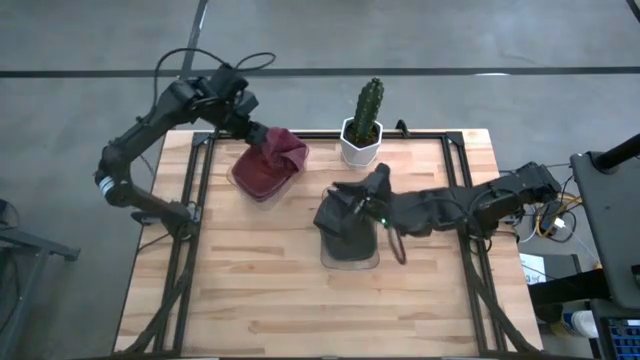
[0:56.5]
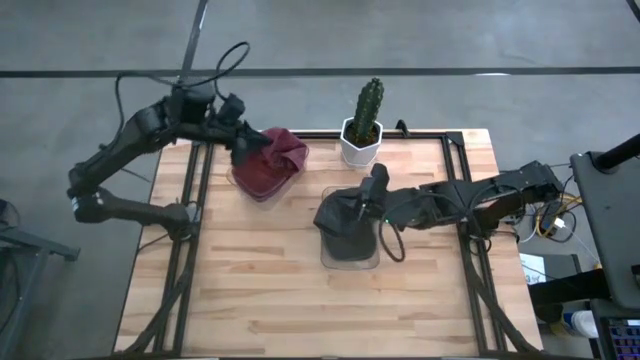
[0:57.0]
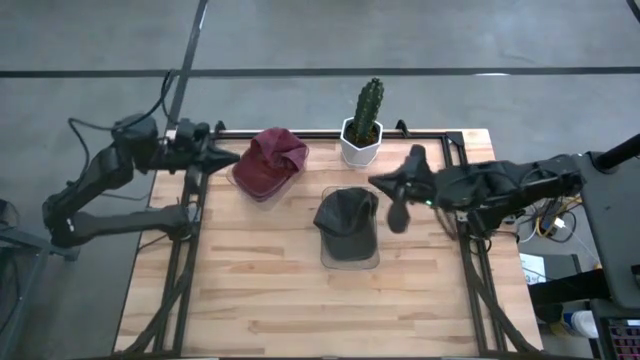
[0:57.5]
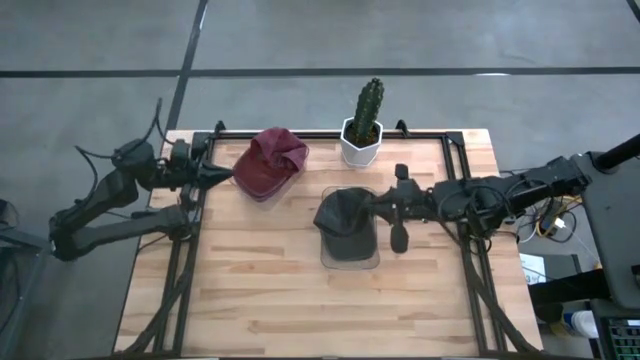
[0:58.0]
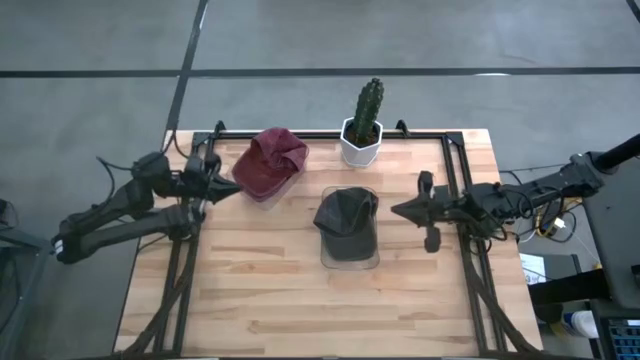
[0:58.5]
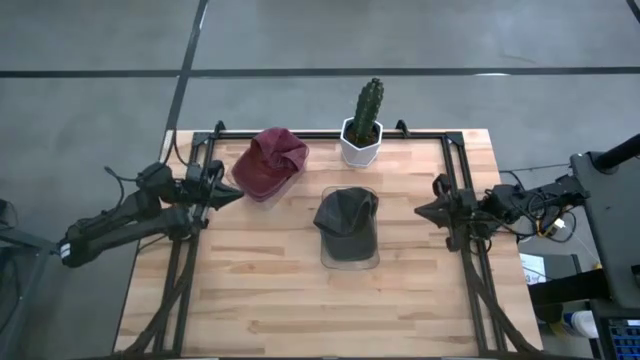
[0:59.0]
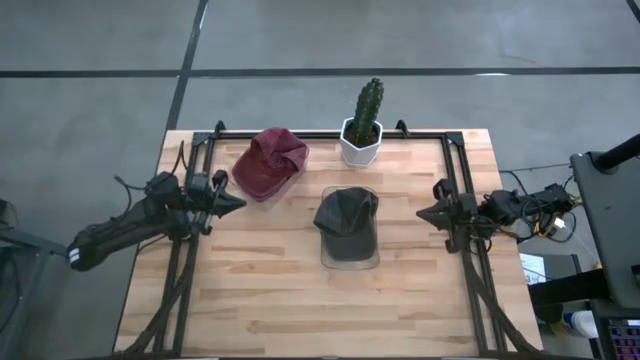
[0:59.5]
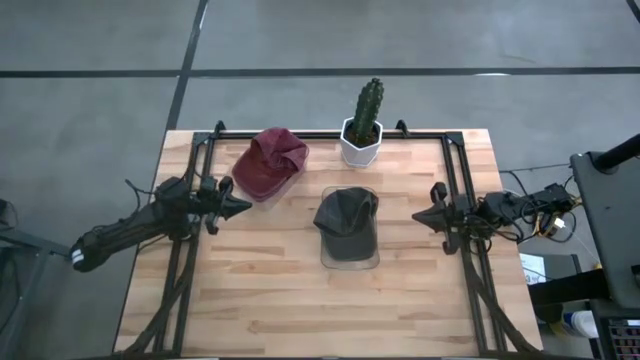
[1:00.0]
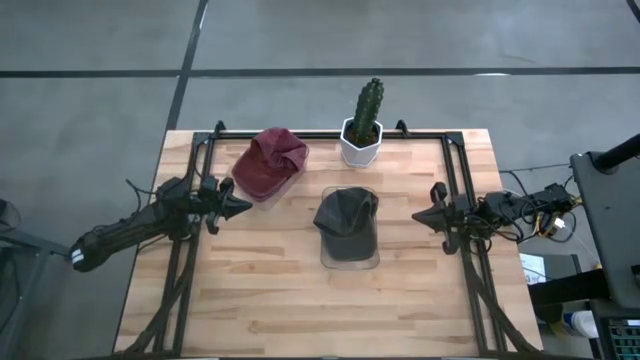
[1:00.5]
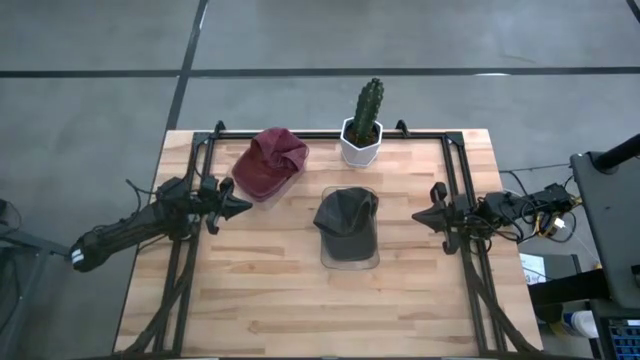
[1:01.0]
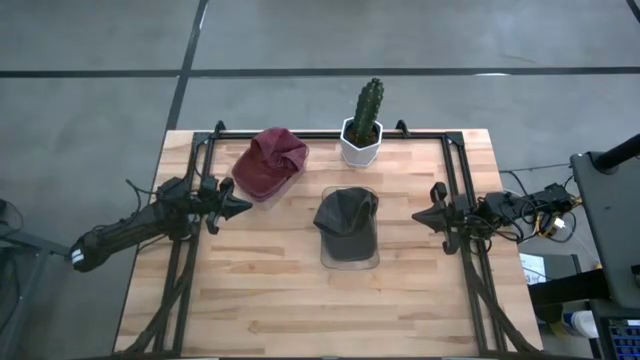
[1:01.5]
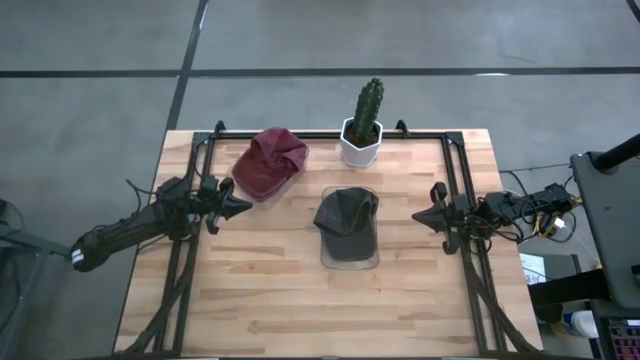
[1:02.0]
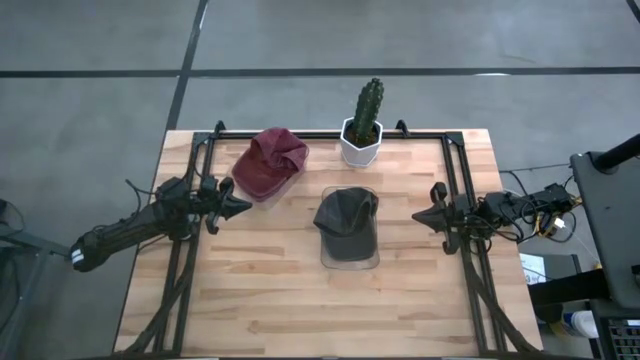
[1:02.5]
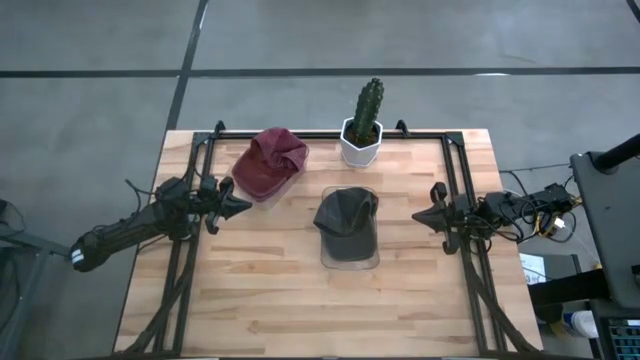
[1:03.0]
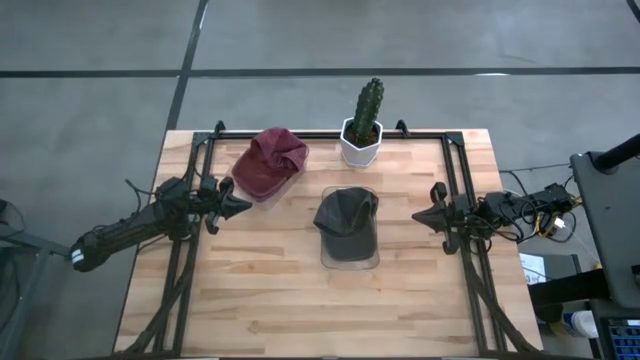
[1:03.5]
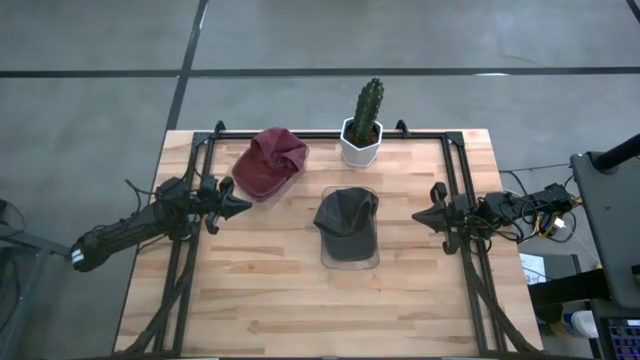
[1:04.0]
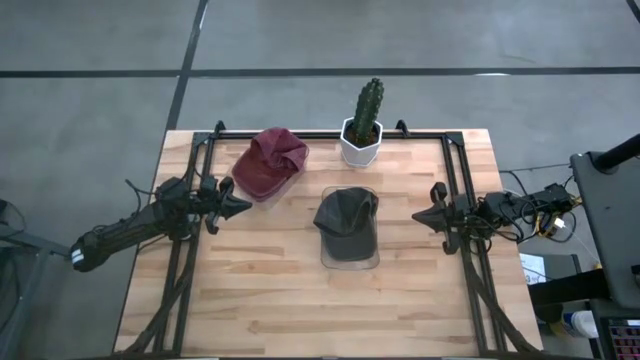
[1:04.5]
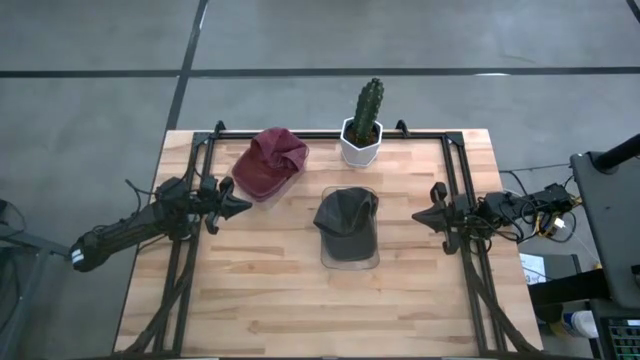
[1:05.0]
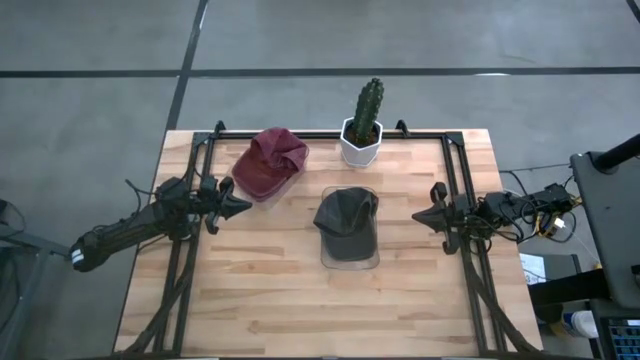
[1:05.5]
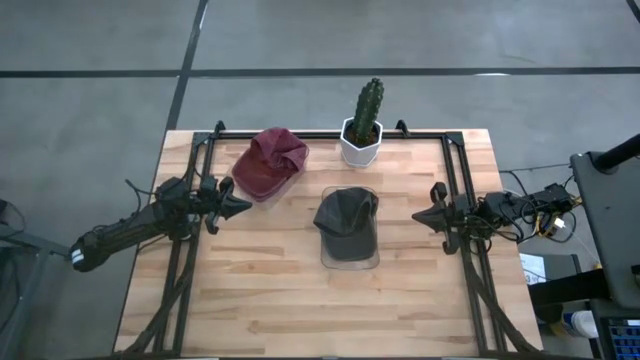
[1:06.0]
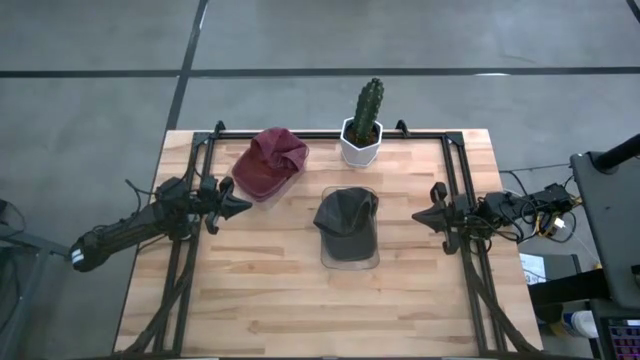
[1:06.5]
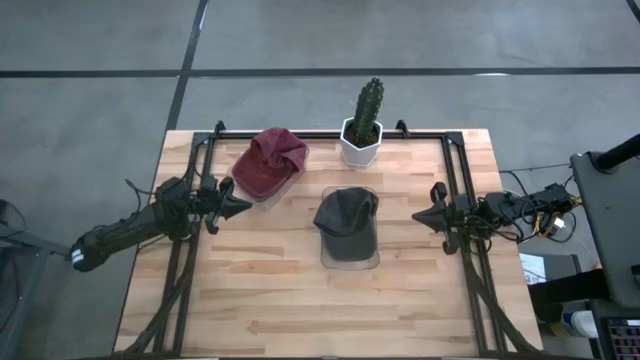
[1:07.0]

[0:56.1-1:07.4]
Task: Pick & Place hat
Return to Home Position

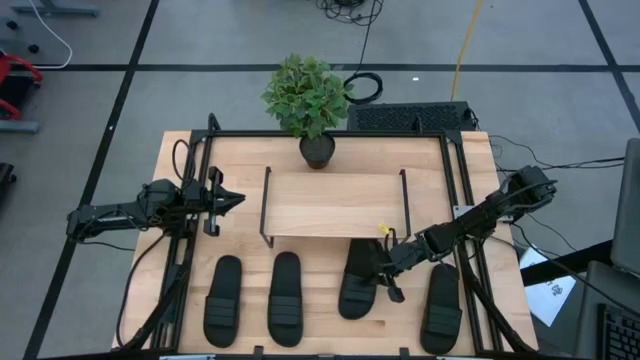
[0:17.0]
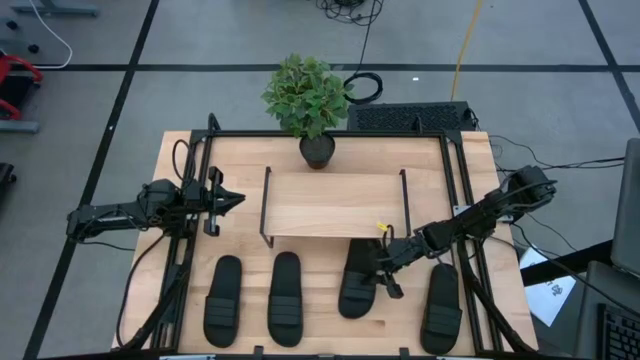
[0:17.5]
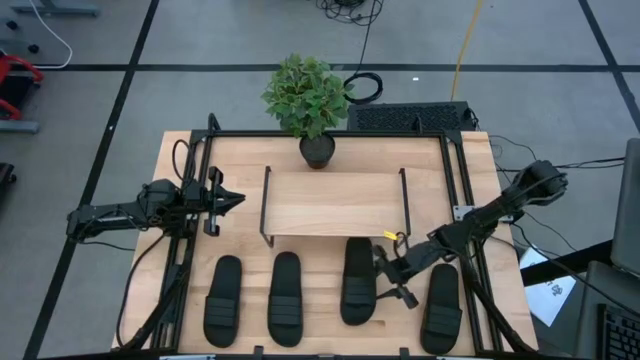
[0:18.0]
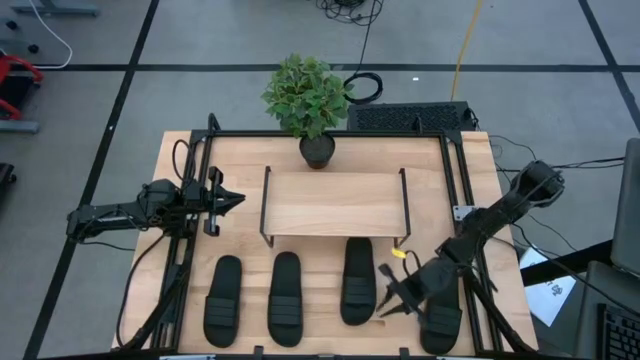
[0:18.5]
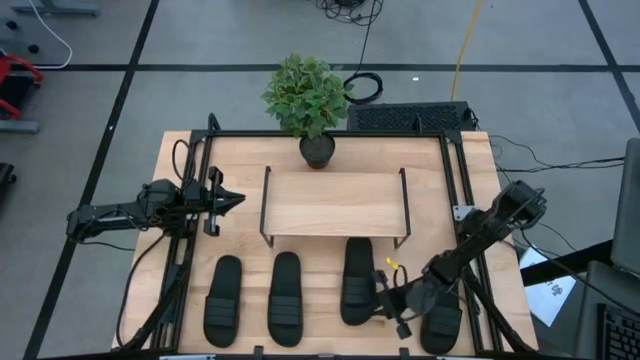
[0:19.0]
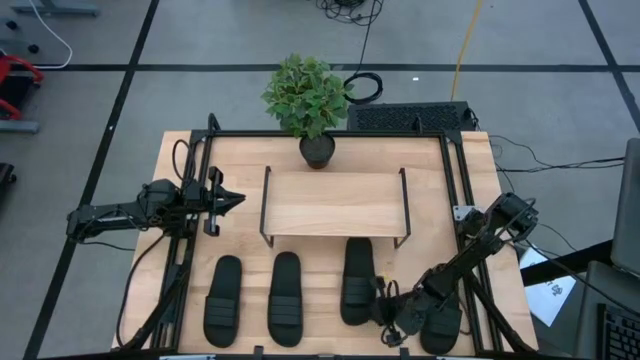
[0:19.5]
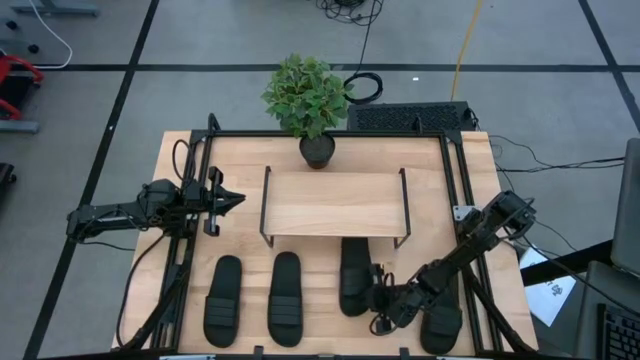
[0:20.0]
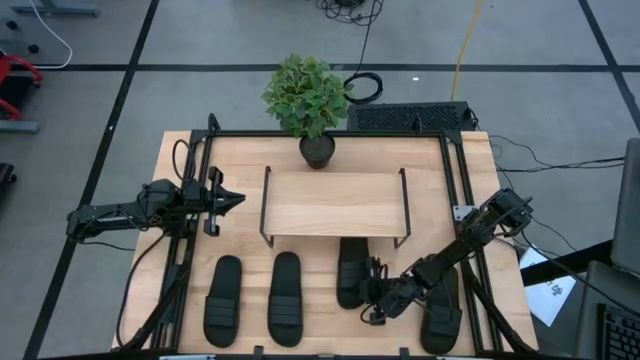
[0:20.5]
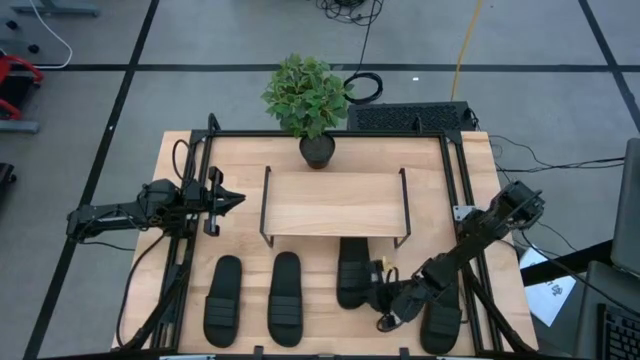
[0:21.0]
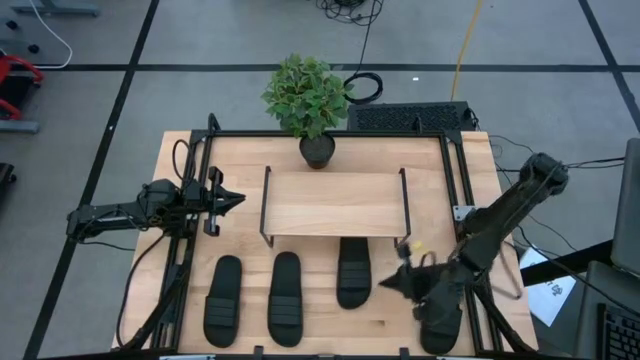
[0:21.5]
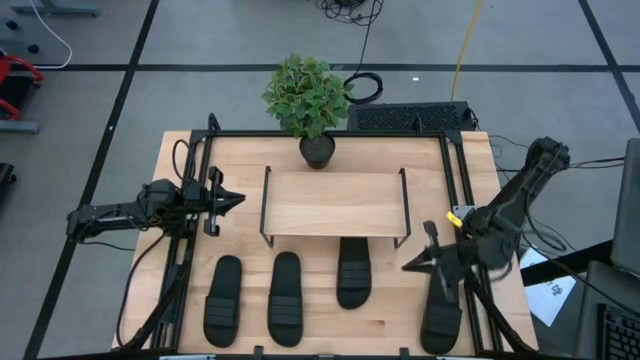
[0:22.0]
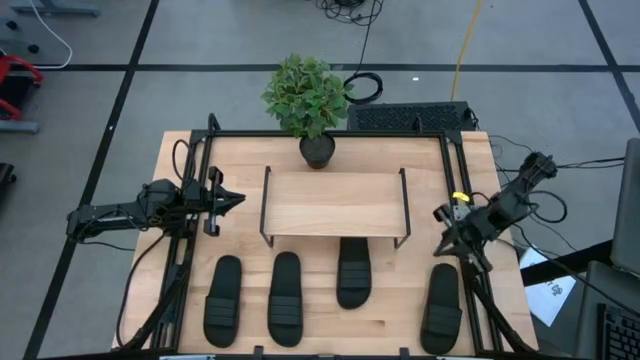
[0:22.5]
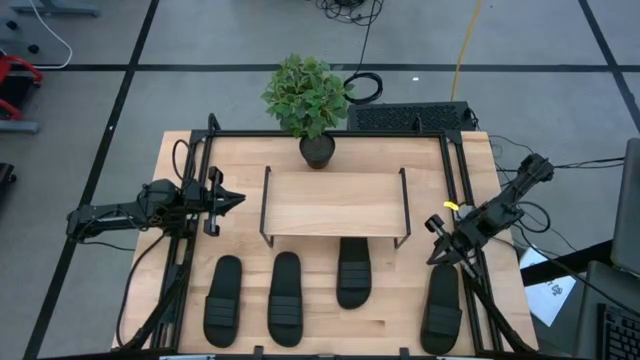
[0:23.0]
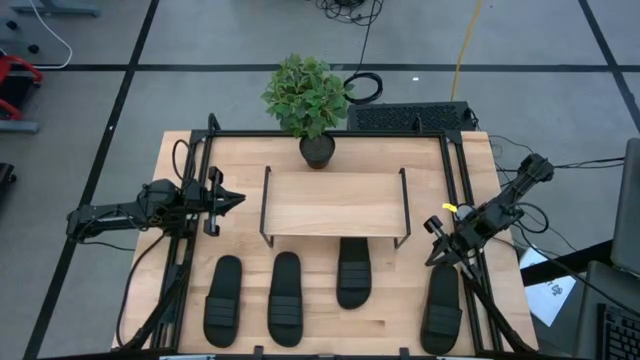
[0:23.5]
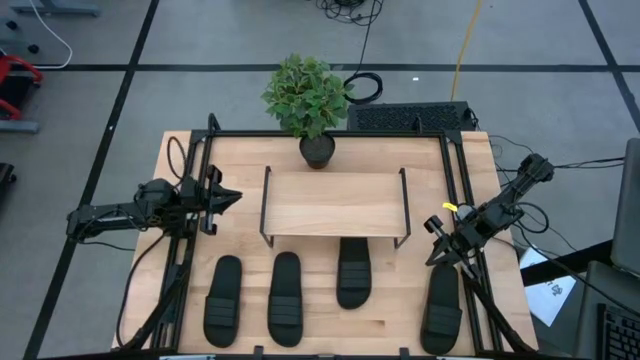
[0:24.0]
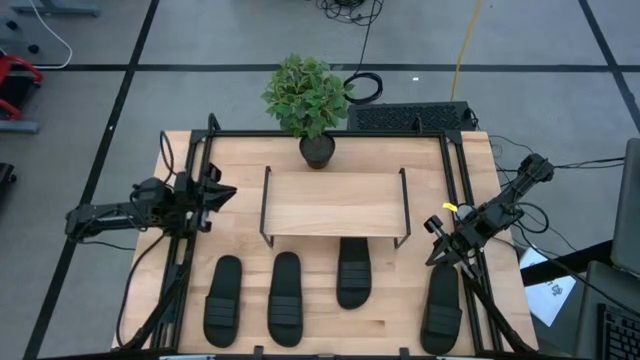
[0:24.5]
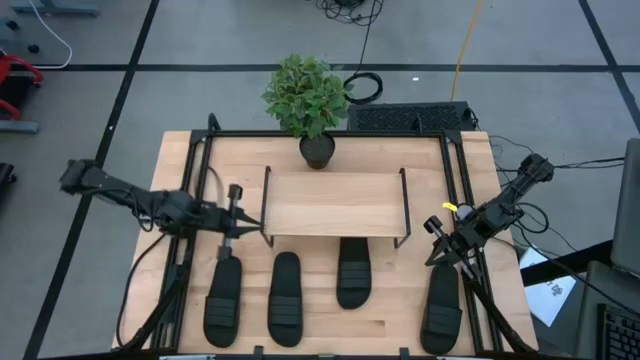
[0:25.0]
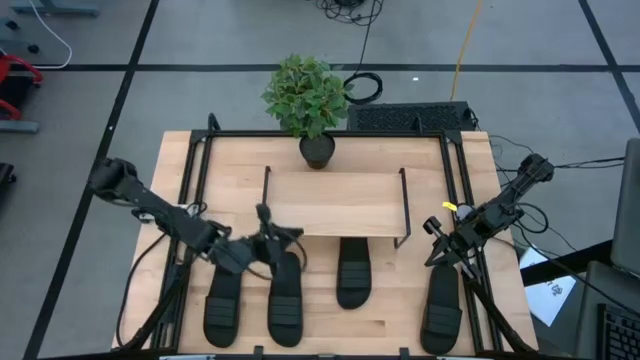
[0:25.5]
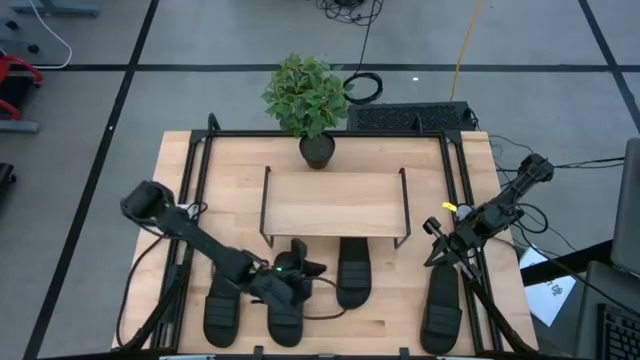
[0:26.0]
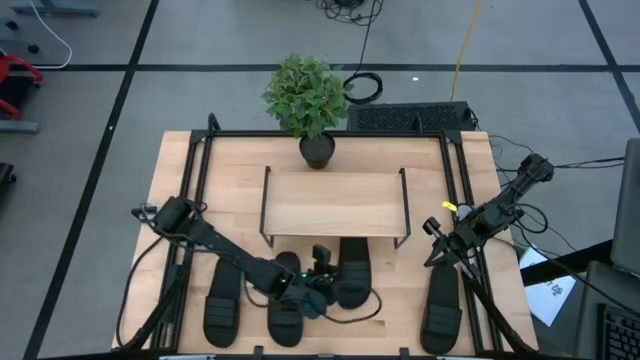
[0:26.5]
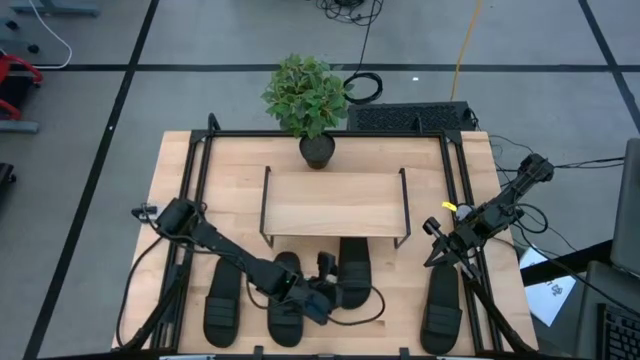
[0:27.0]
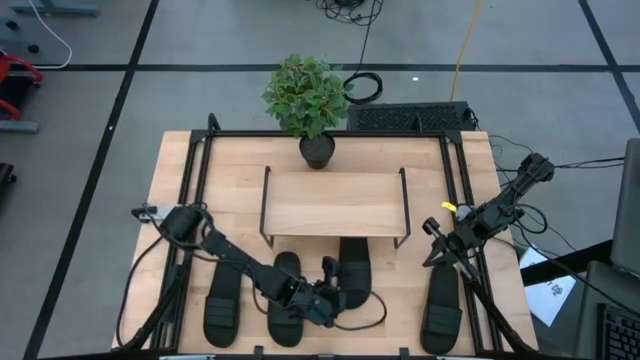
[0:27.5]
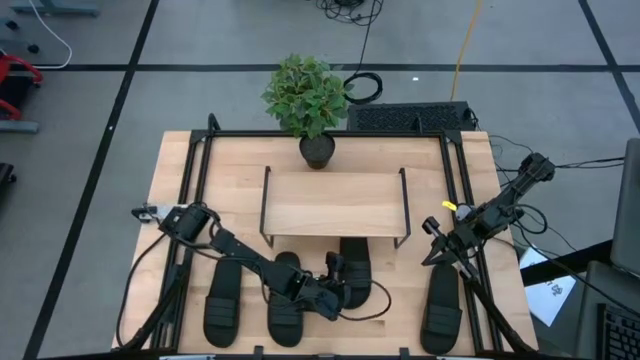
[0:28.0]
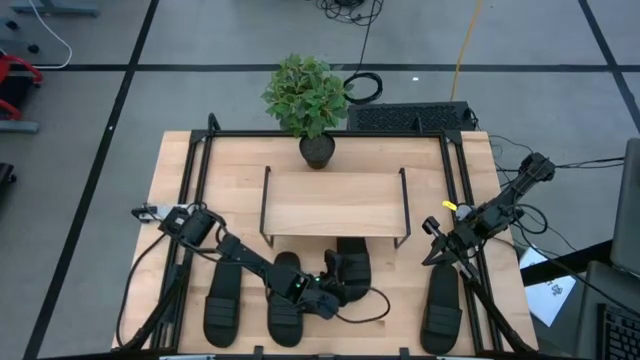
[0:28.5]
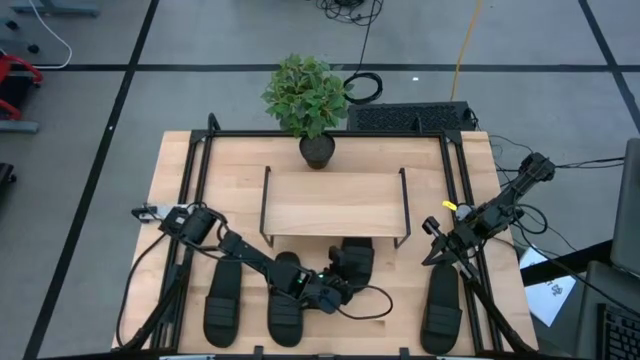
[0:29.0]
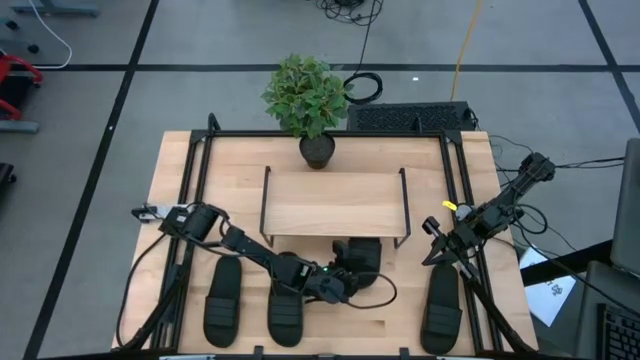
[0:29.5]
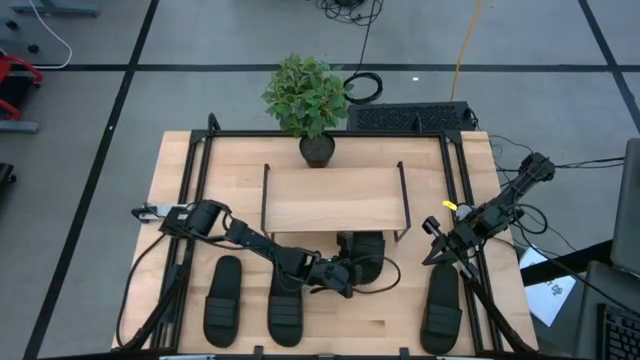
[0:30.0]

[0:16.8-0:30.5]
Task: Pick and place slides into the shelf
Put the black slides under the shelf
